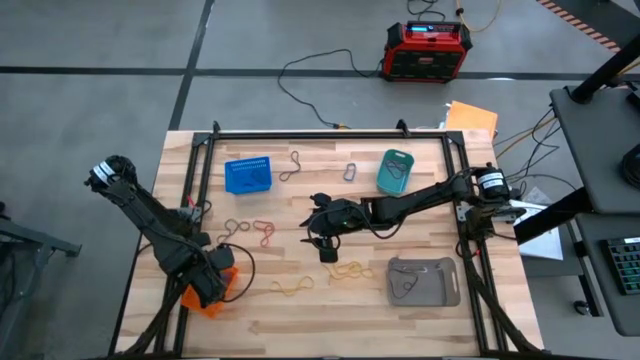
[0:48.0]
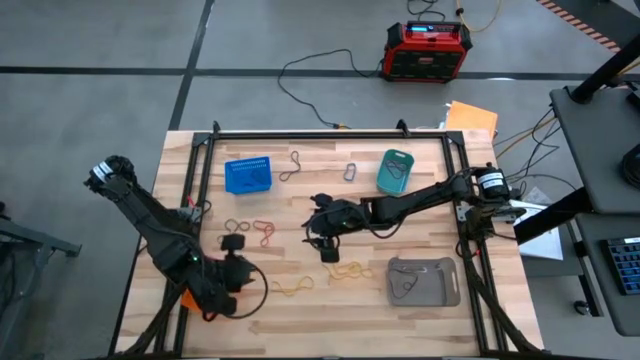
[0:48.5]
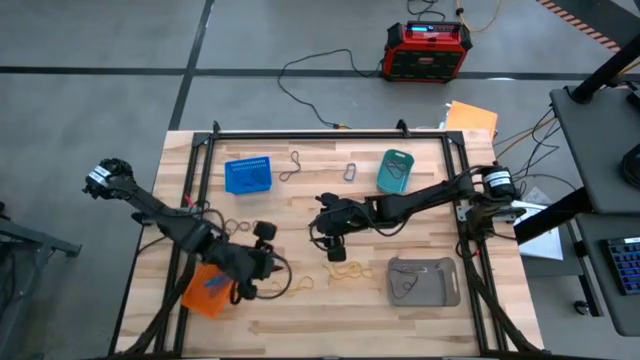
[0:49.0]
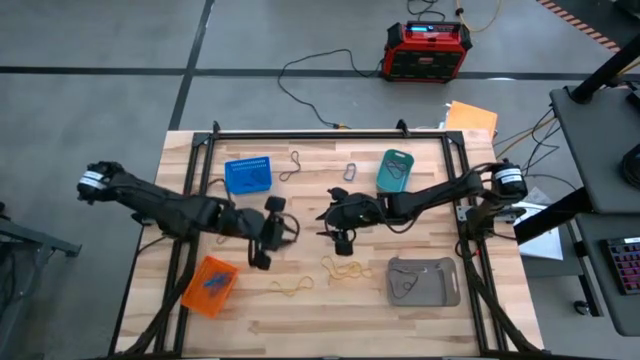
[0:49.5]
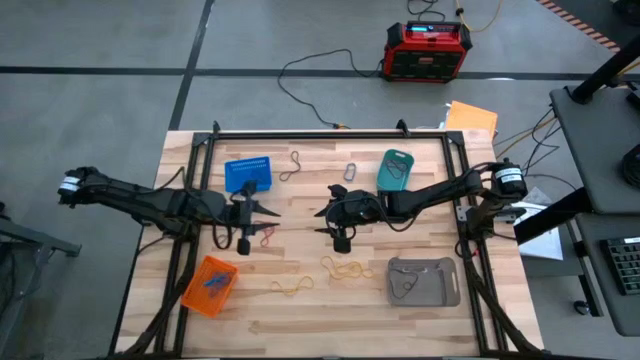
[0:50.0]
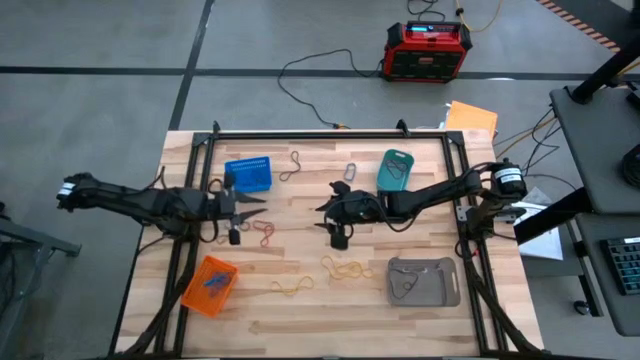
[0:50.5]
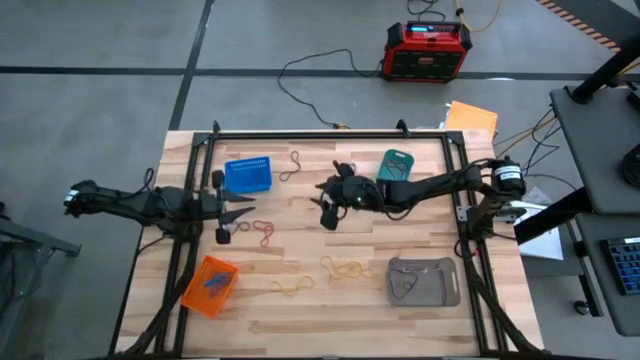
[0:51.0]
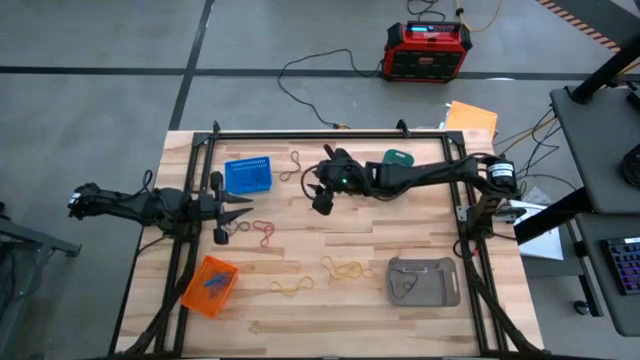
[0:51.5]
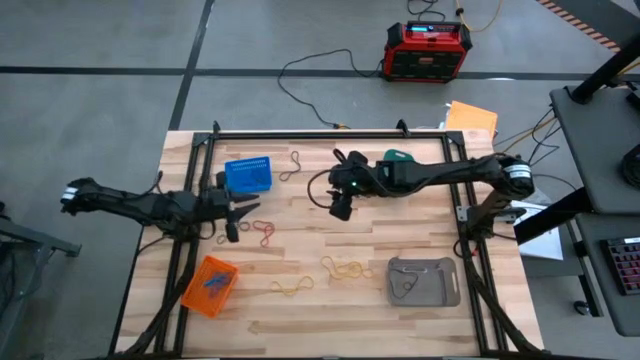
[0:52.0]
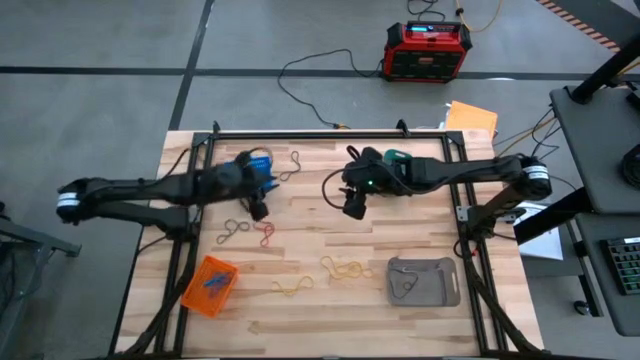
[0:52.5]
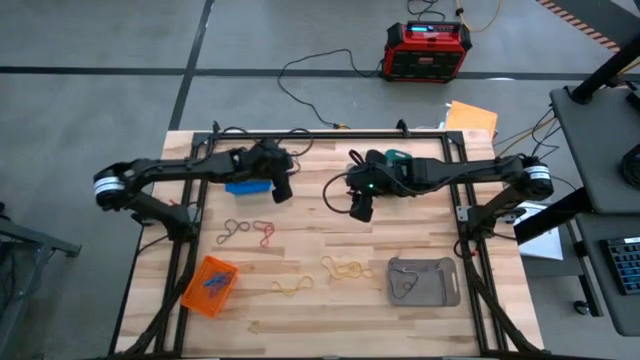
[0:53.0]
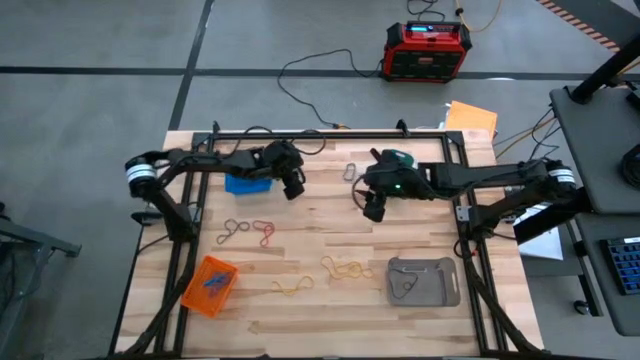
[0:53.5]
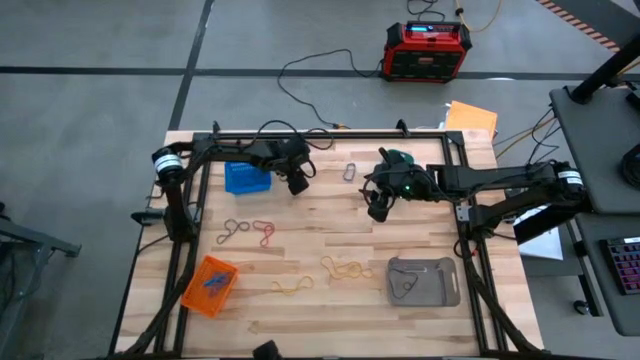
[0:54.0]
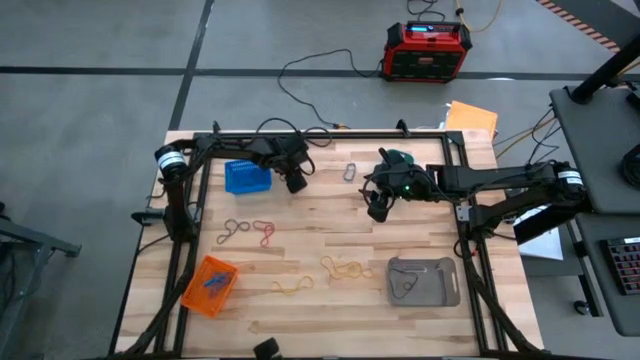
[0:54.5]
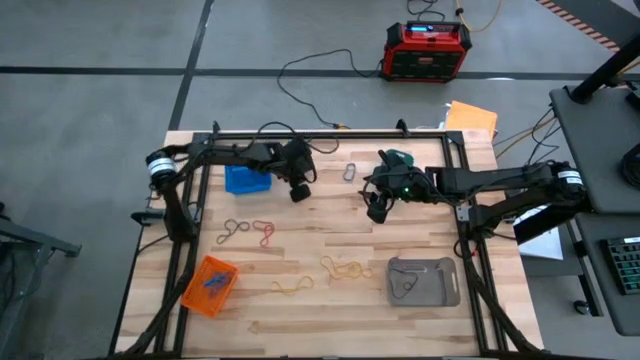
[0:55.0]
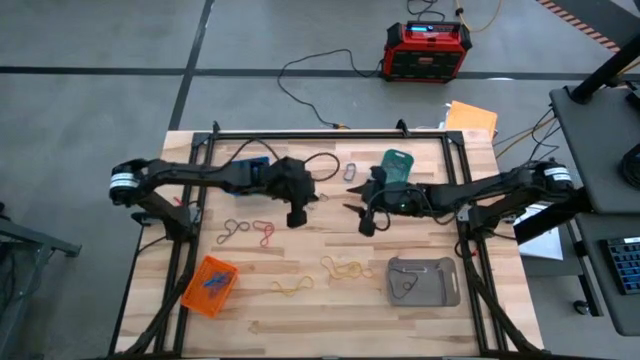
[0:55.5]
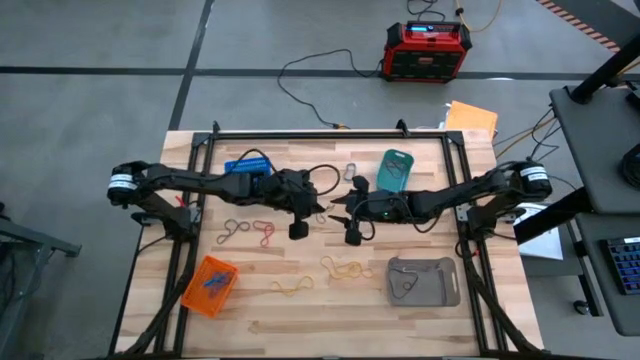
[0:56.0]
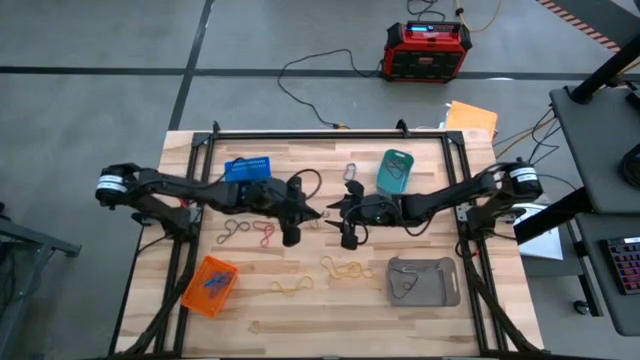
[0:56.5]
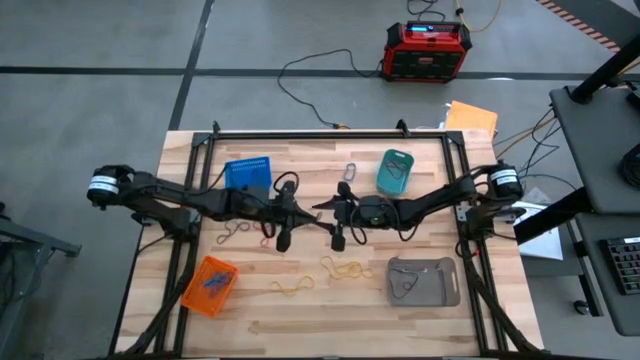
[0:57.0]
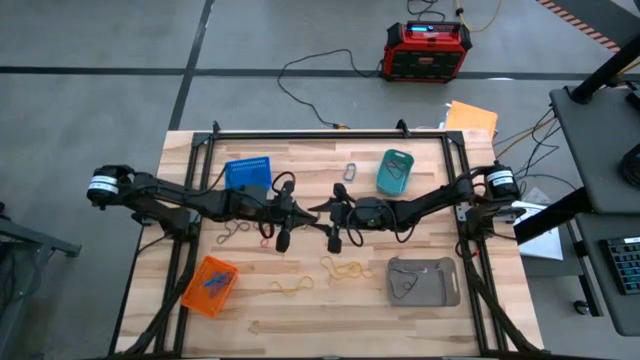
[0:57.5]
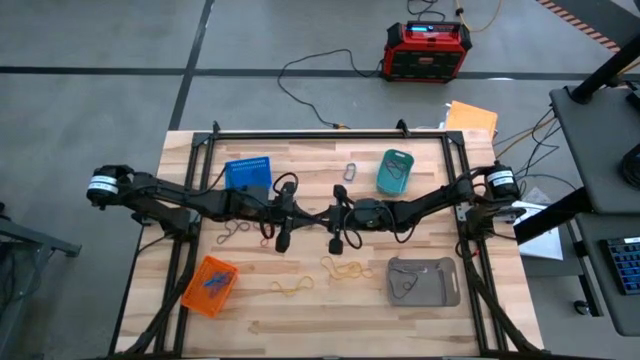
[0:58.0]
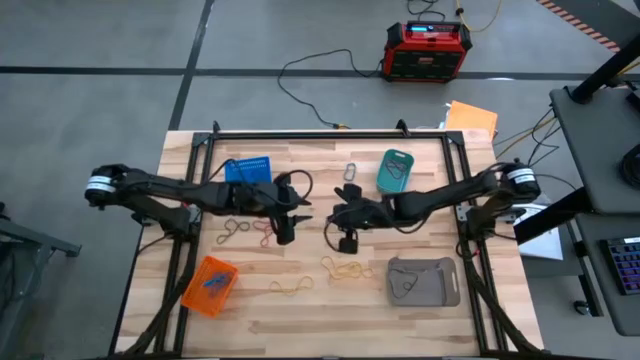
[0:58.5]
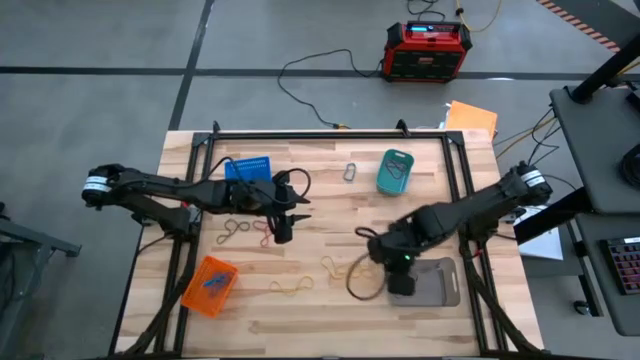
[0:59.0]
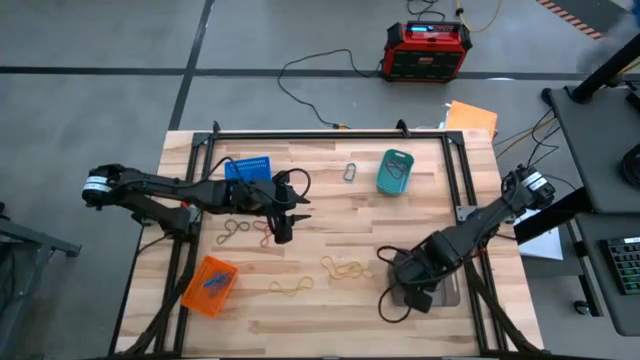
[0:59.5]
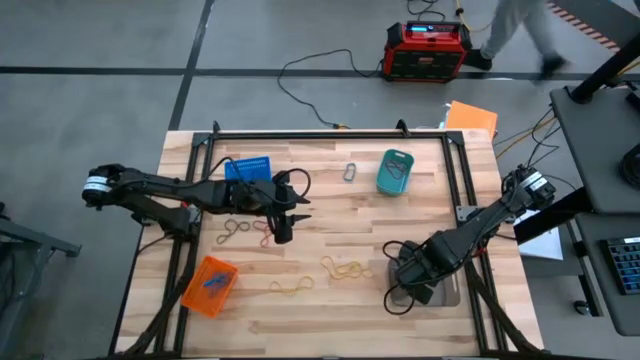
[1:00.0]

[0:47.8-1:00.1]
Task: Sort rubber bands into baskets
Put the top violet rubber band into black bin

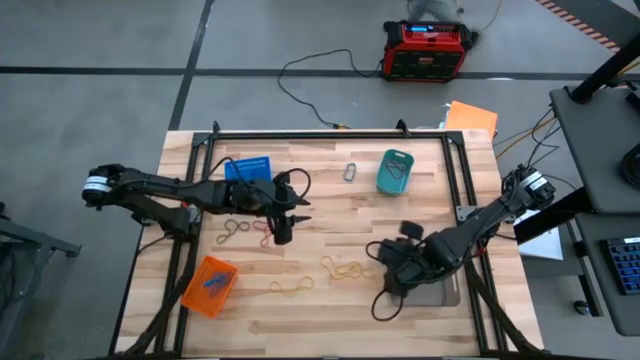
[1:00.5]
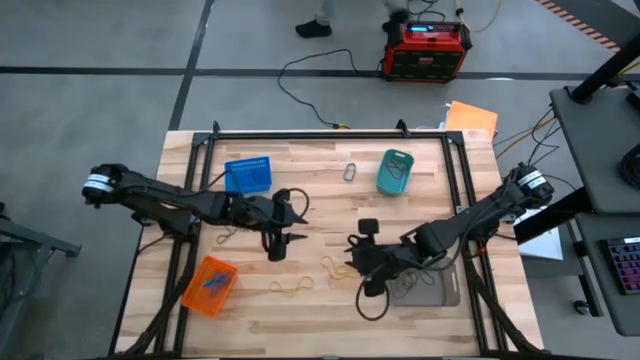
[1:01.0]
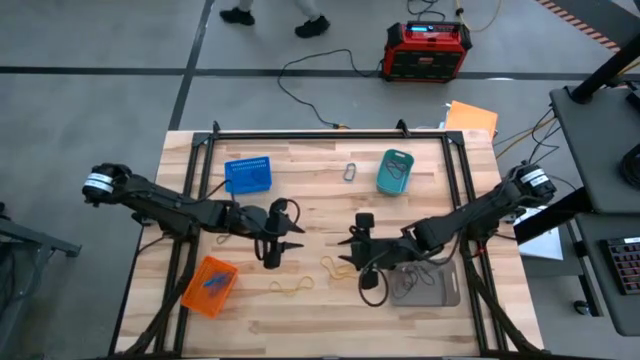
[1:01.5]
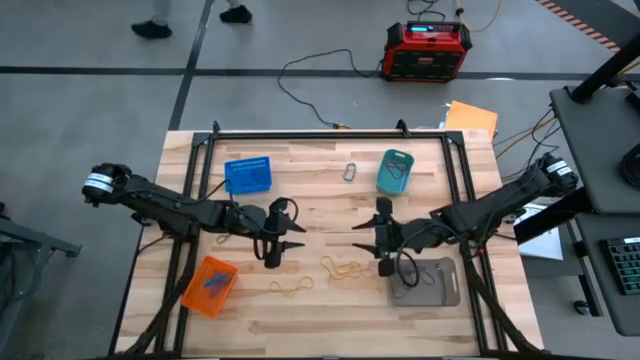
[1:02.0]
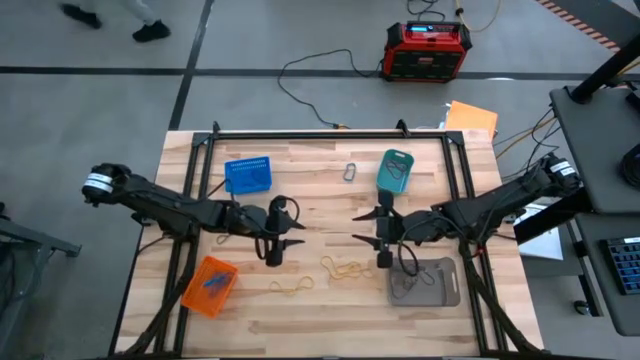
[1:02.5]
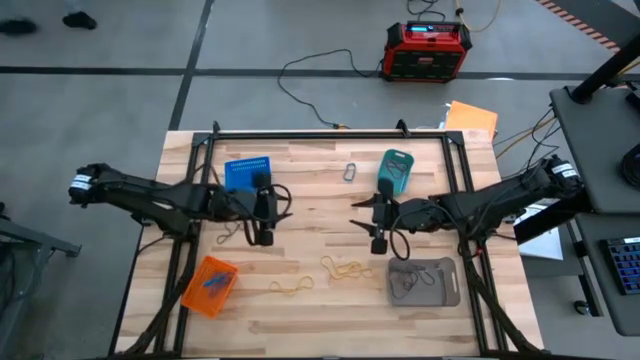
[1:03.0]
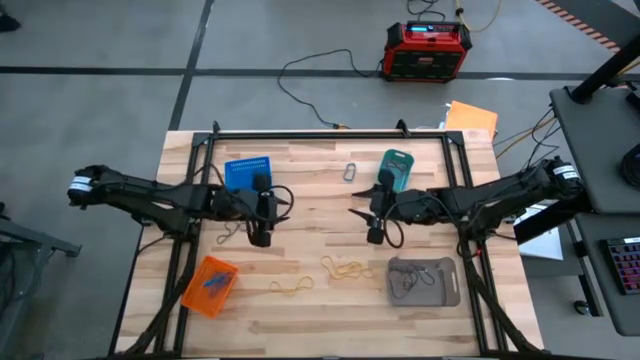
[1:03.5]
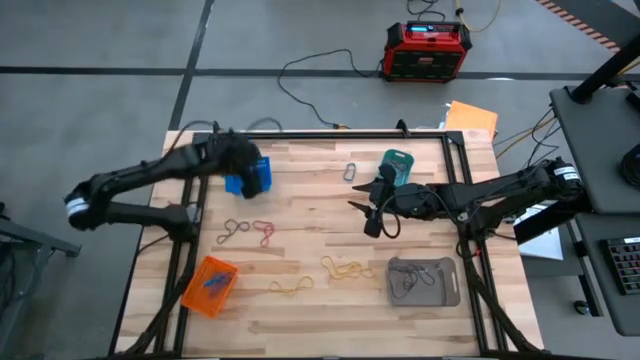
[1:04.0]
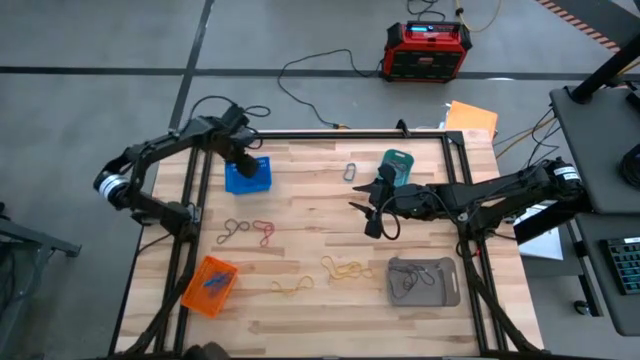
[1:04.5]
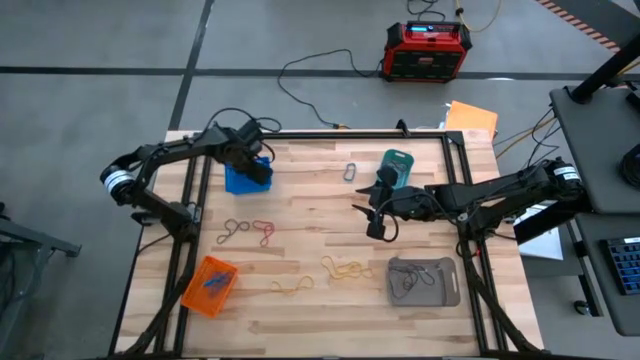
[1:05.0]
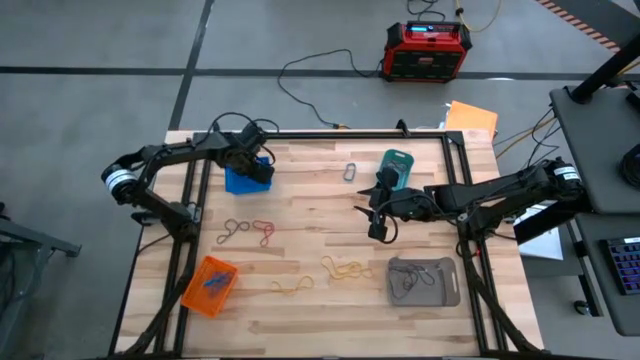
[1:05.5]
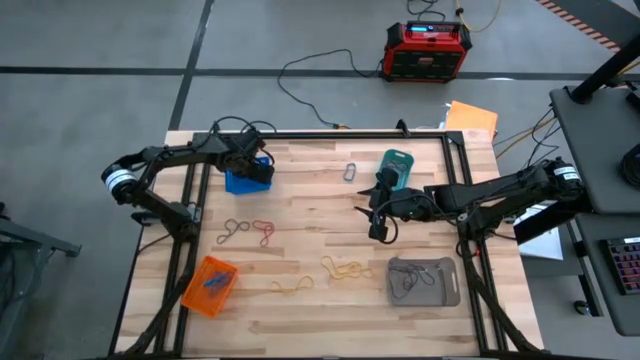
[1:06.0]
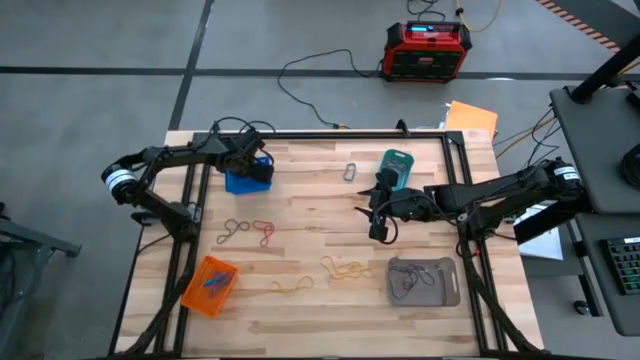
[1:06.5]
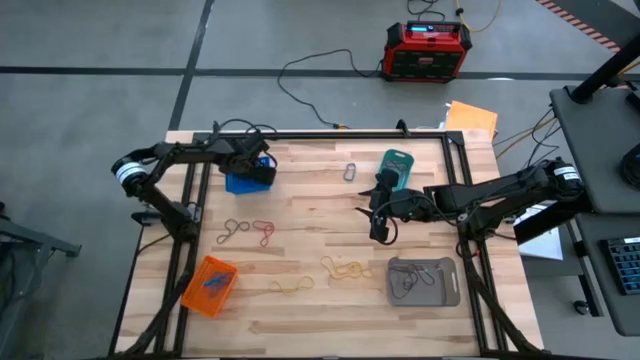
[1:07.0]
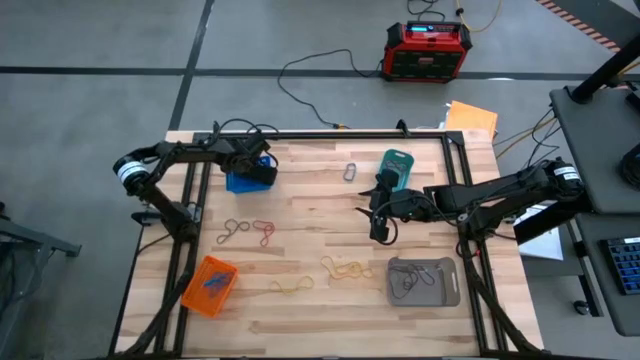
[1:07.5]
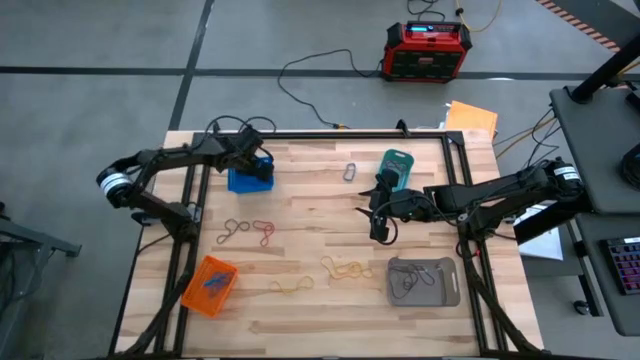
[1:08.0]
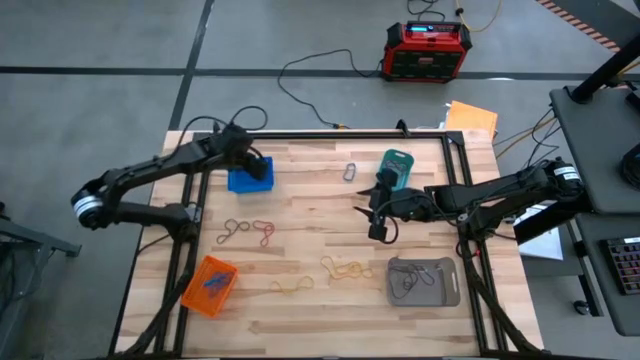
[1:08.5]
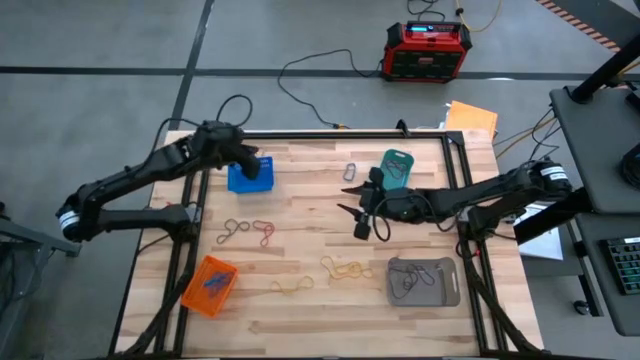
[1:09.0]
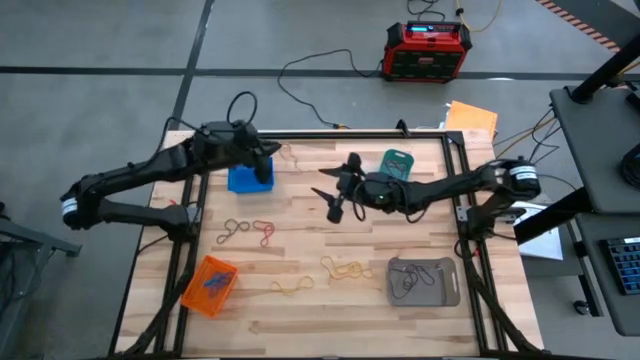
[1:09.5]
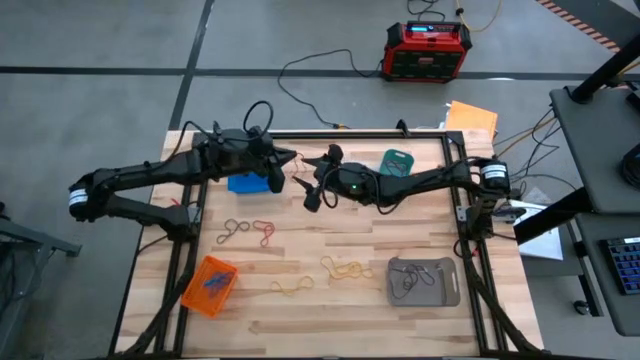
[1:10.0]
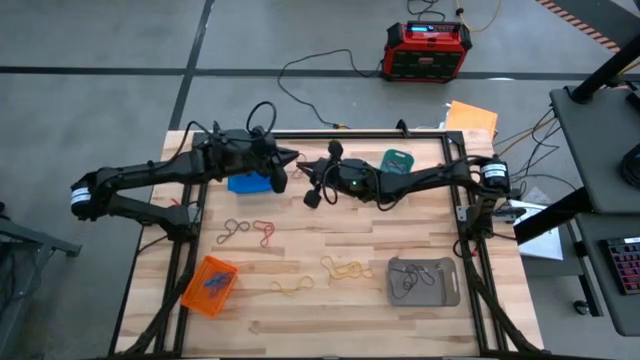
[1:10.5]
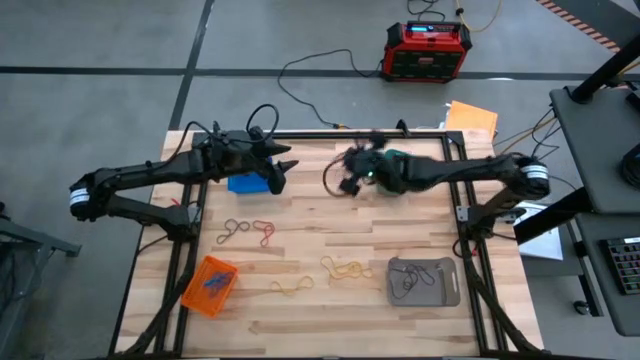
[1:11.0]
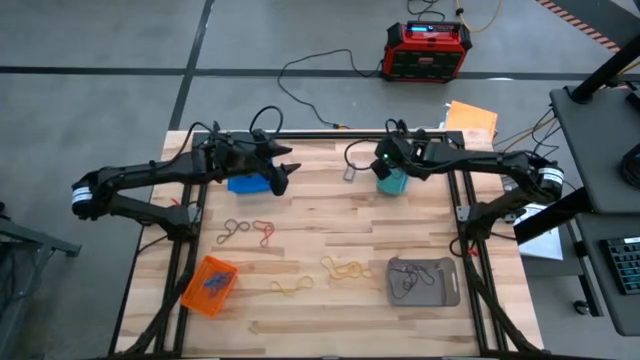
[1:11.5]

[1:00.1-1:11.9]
Put the orange rubber band from the left blue bin into the right blue bin
